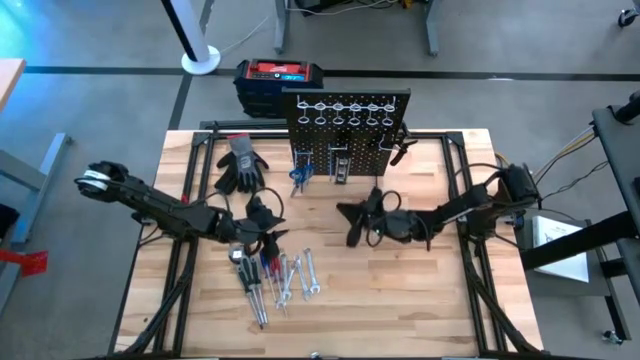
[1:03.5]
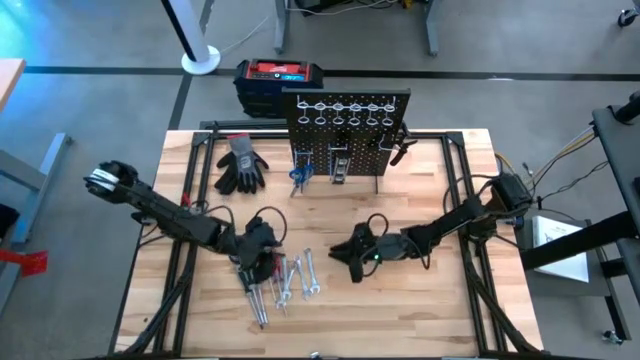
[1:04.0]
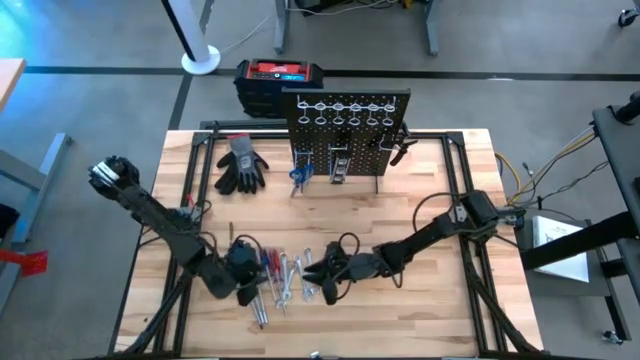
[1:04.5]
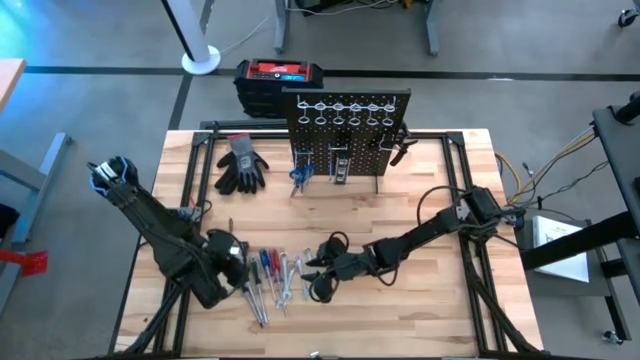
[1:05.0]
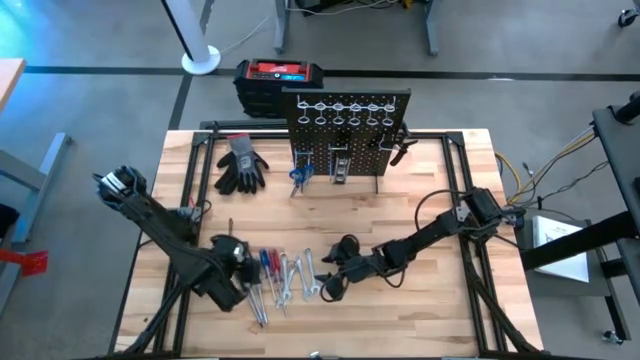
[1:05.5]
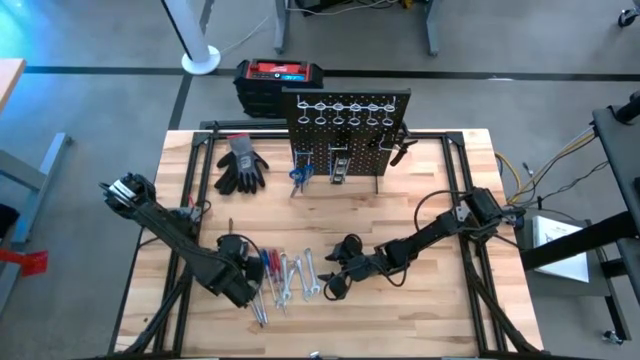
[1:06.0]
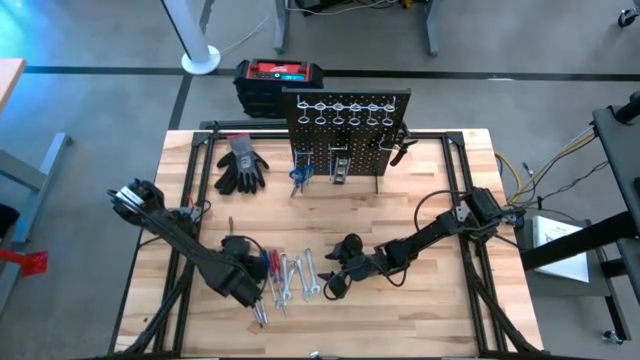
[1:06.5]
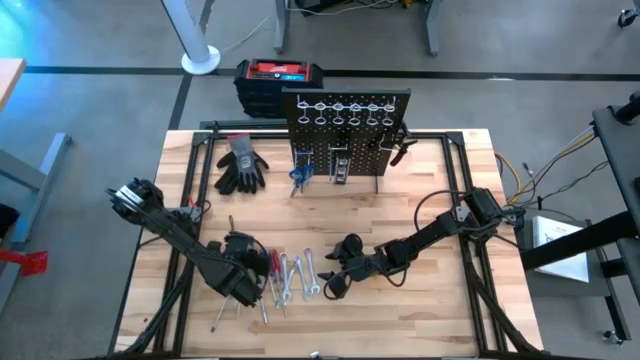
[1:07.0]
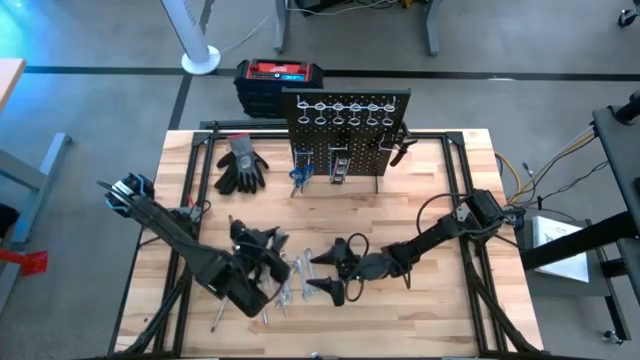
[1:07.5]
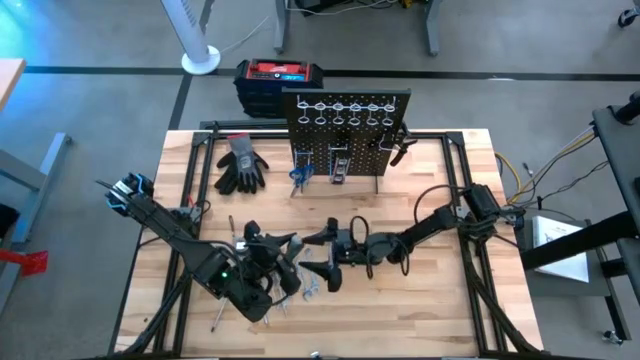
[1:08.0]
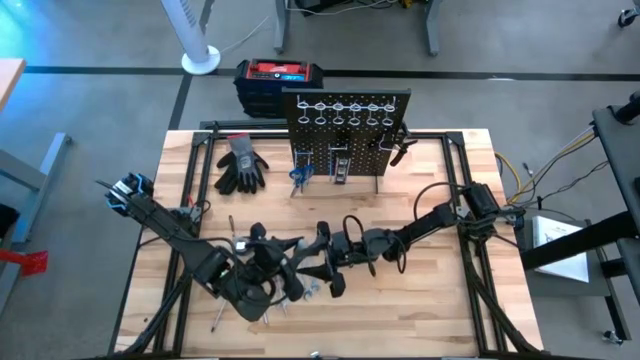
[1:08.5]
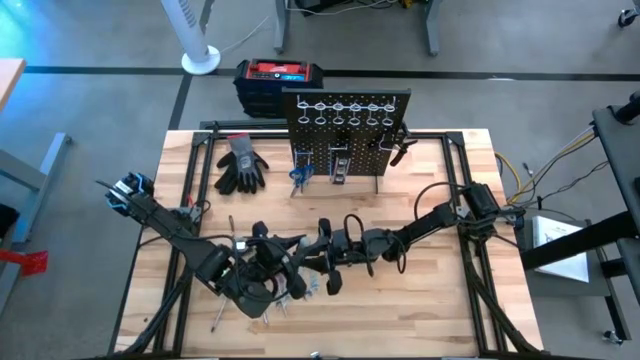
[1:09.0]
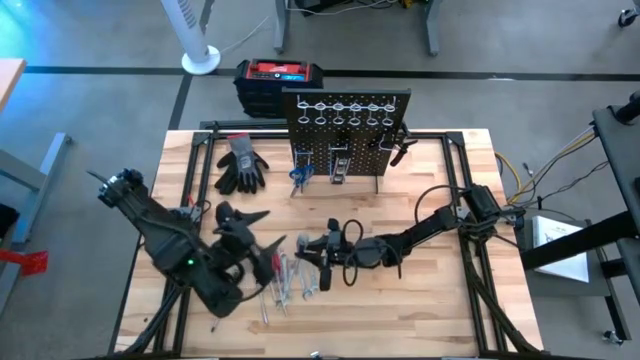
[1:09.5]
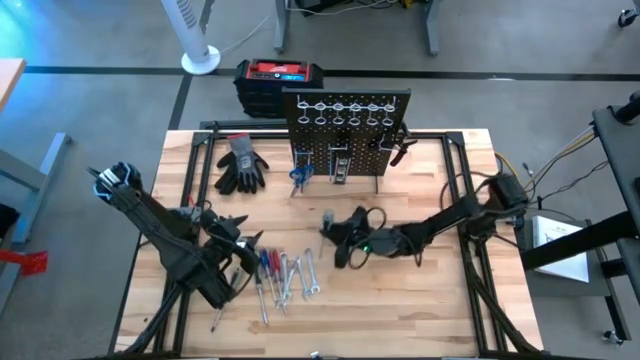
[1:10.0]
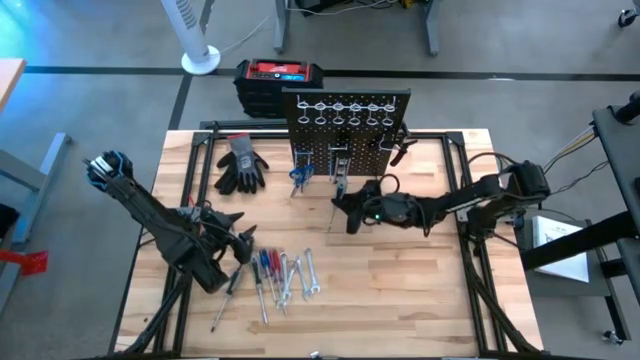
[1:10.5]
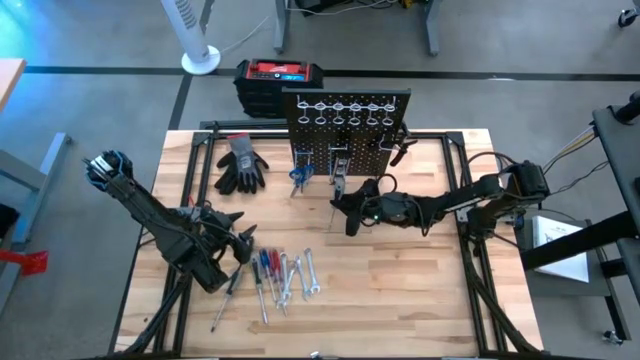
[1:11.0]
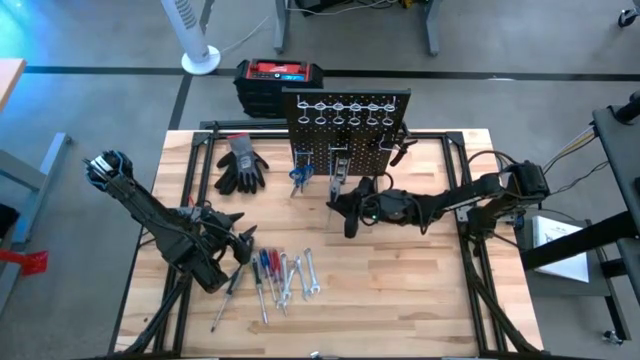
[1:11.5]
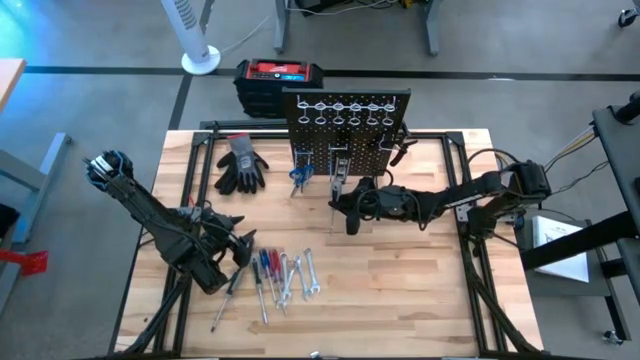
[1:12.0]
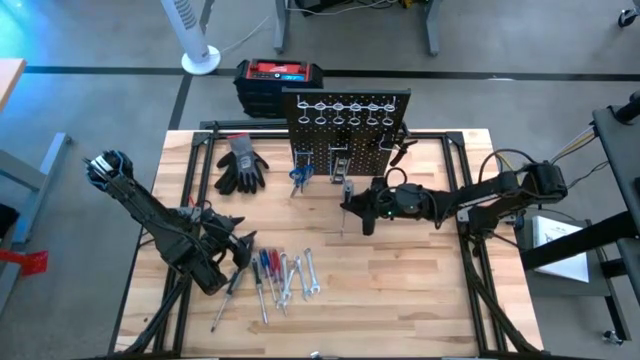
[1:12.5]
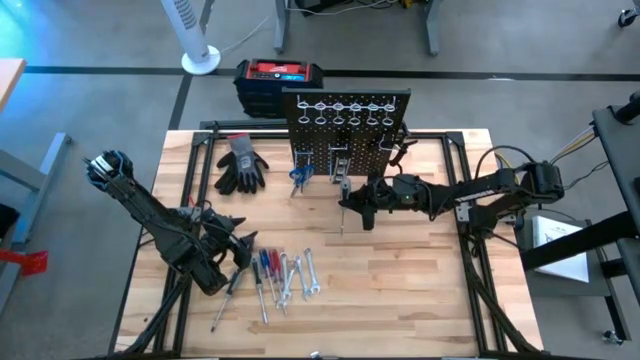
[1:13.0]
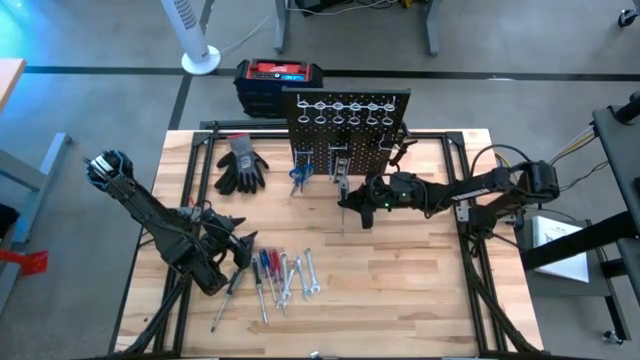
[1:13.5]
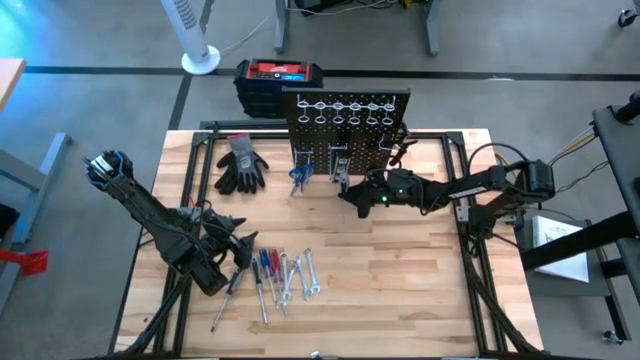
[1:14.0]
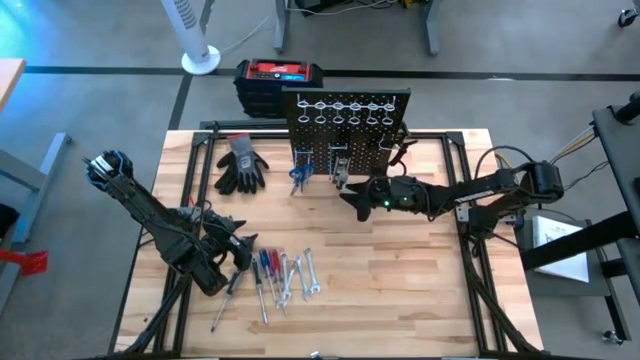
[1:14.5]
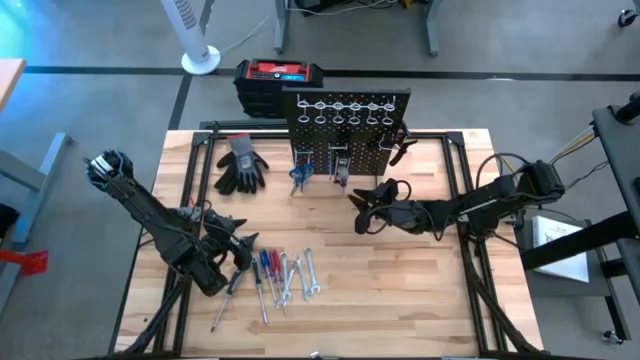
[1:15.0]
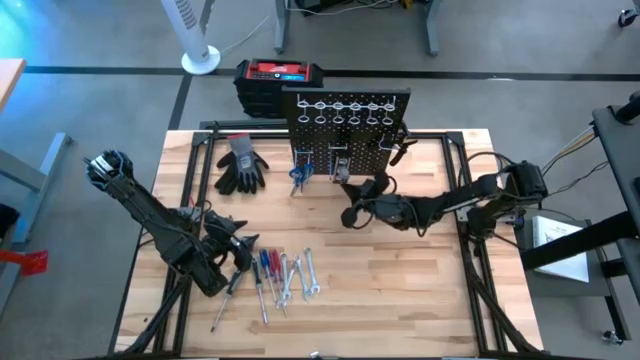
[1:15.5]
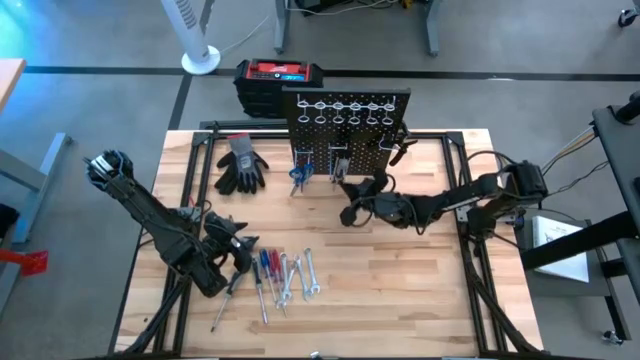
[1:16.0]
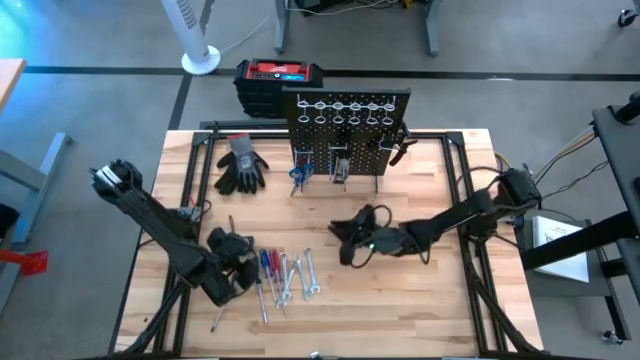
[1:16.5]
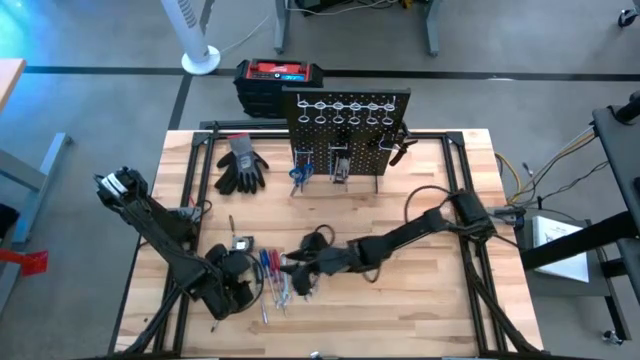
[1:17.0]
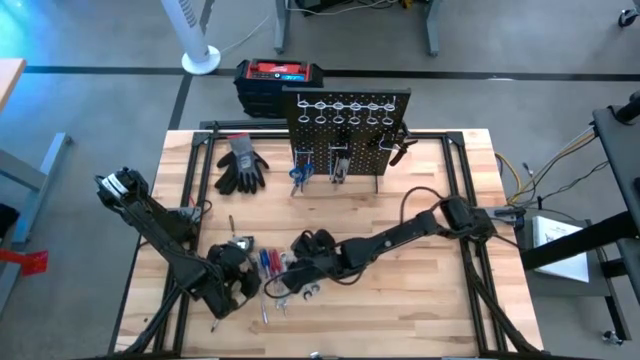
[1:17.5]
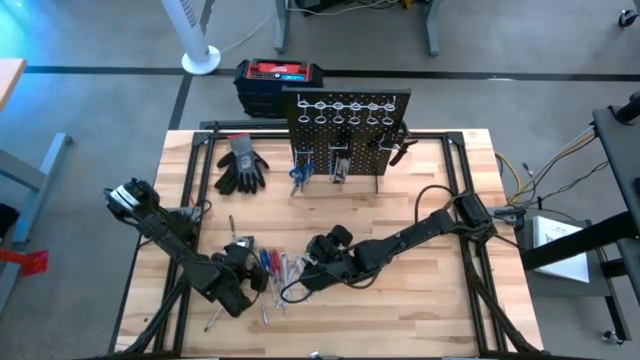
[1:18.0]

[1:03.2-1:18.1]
Task: Hang tools onto peg board
Hang the grey screwdriver on the pegboard

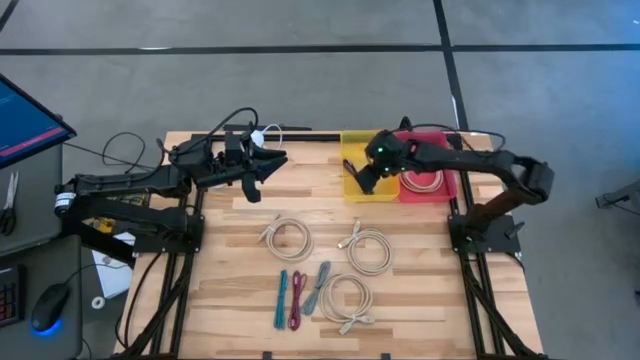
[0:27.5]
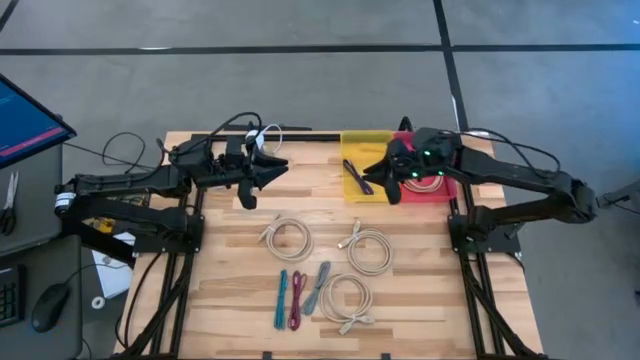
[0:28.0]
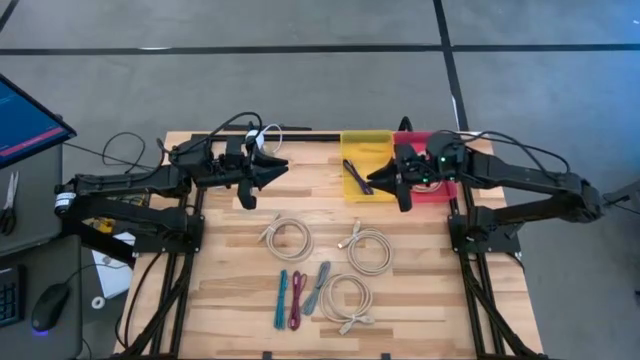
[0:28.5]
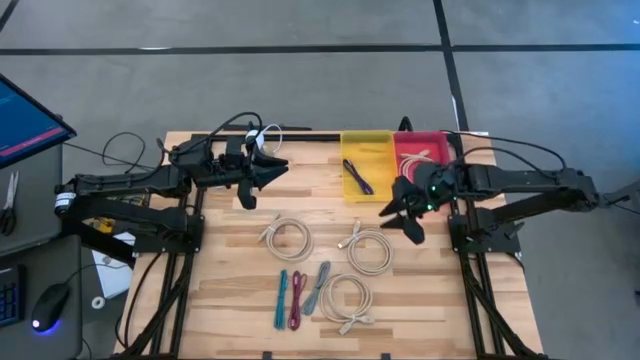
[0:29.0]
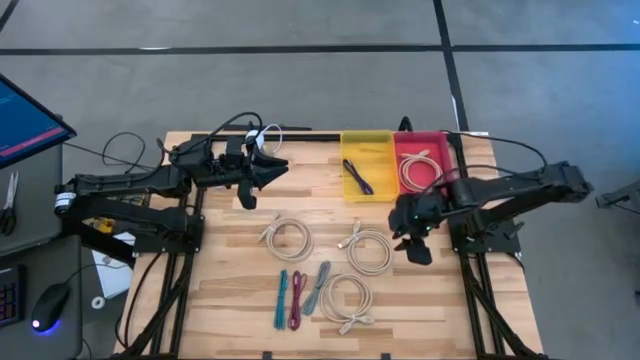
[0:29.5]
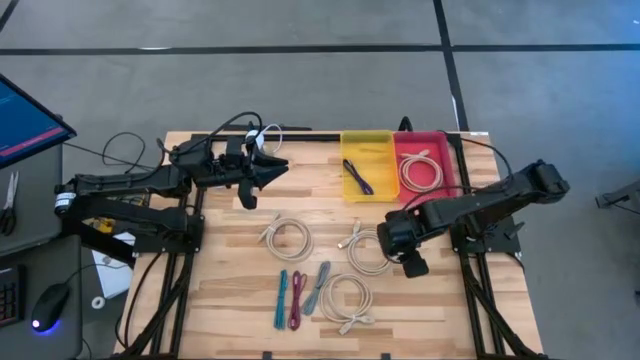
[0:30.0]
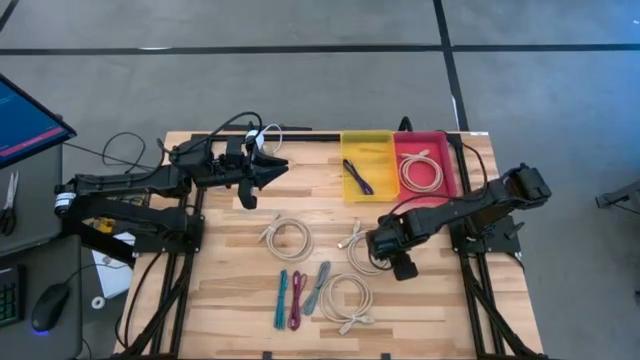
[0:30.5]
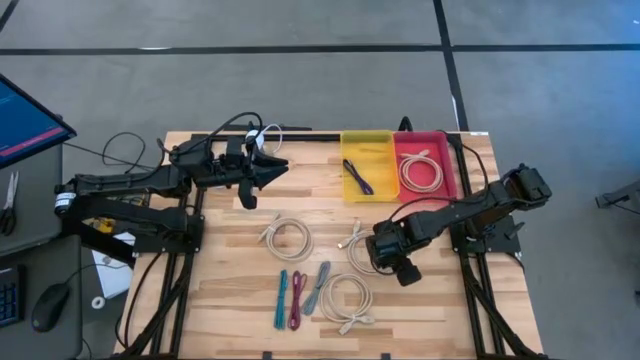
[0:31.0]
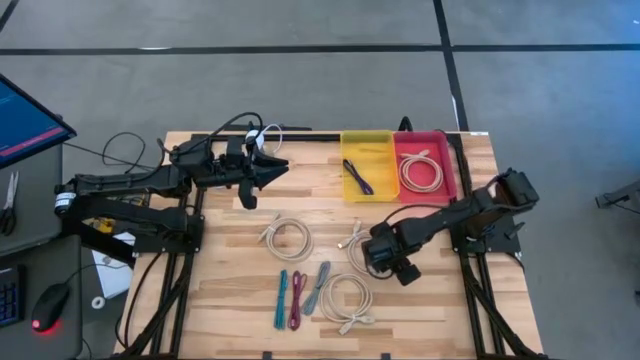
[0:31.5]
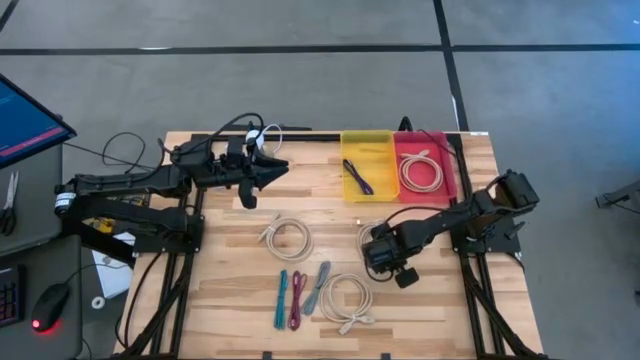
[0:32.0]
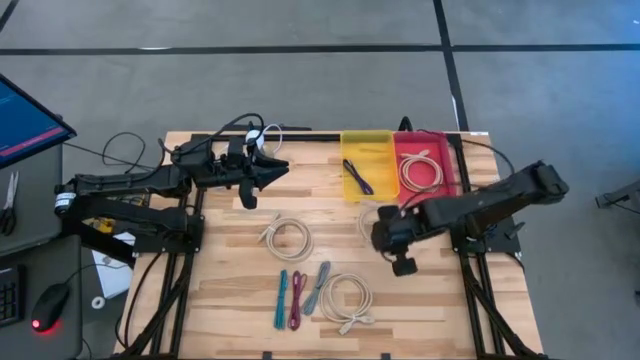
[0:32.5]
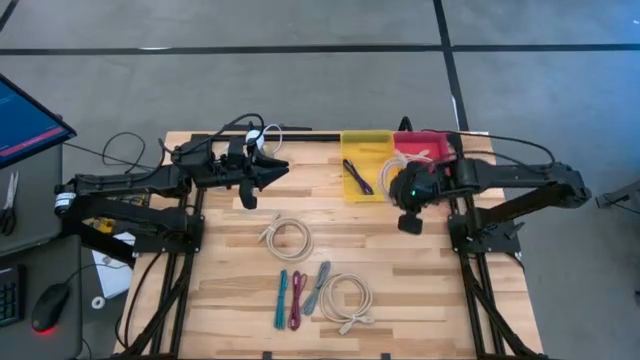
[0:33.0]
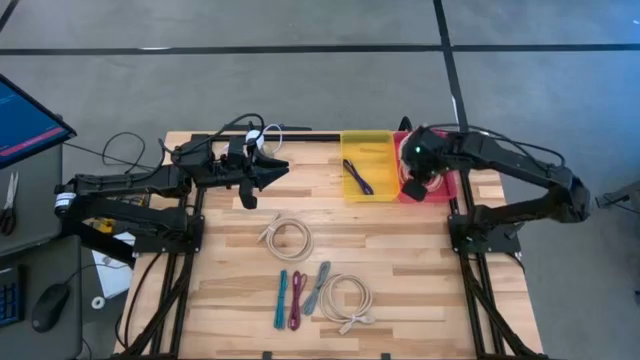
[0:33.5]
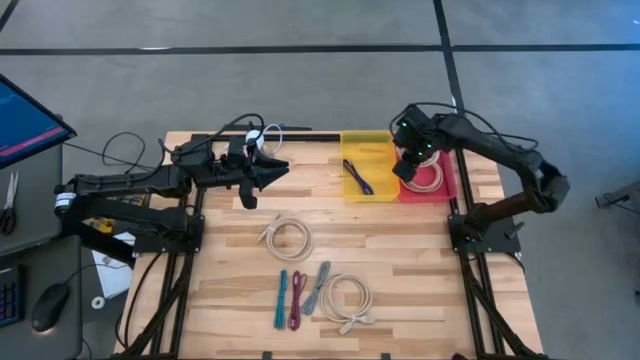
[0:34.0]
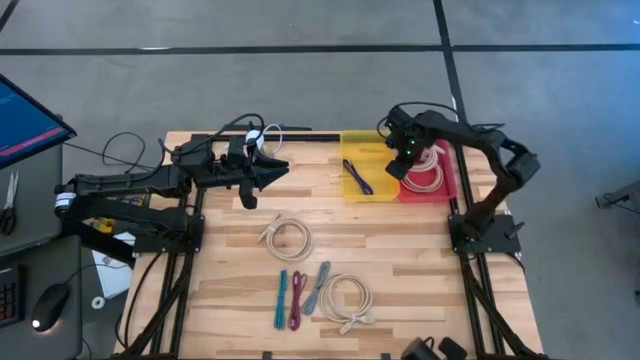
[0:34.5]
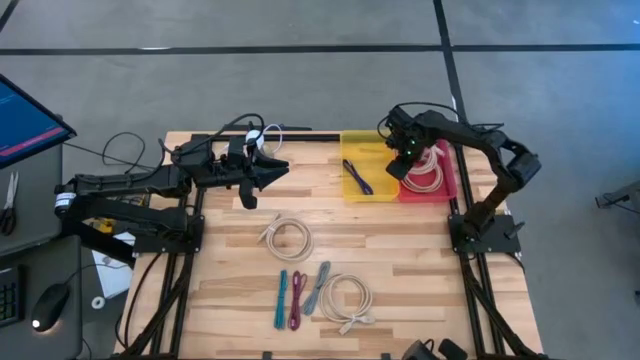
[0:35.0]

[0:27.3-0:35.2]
Task: Pick & Place USB Port
Put the white HDMI cable into the red bin
